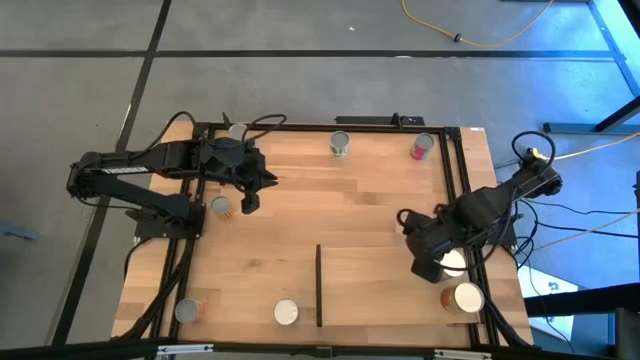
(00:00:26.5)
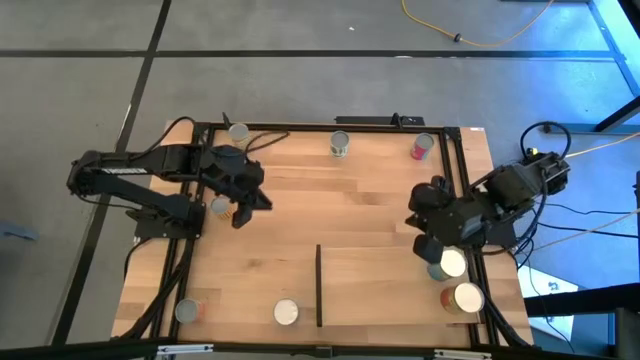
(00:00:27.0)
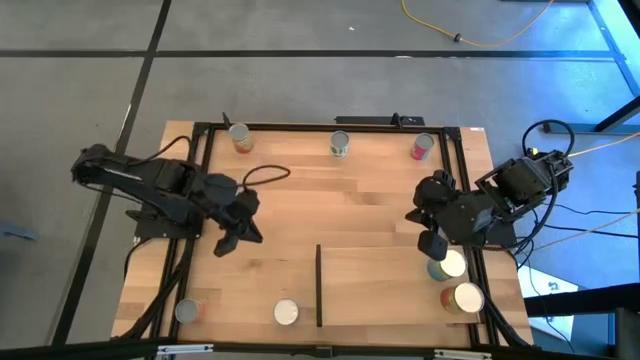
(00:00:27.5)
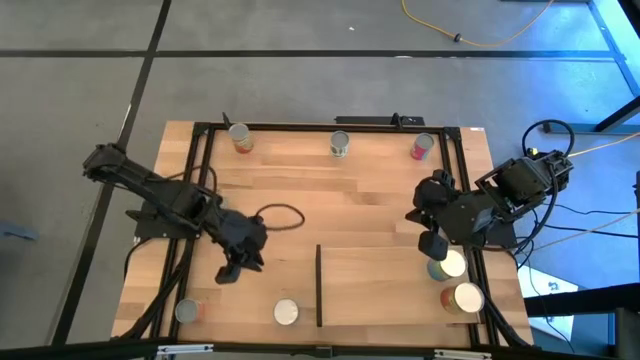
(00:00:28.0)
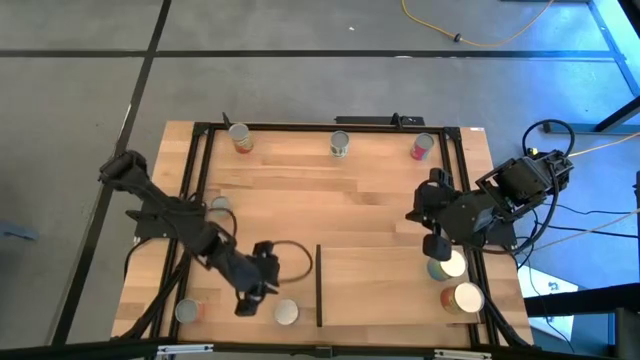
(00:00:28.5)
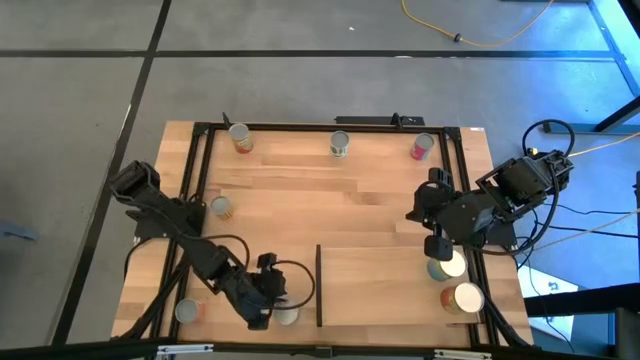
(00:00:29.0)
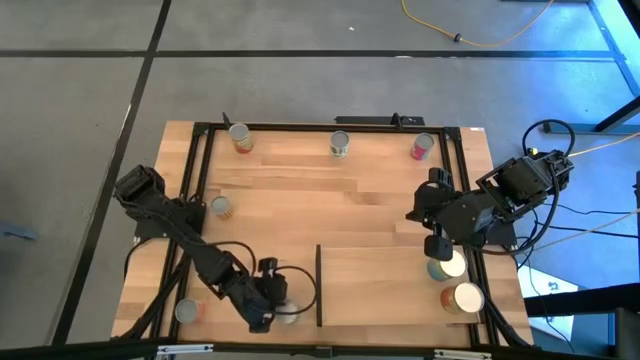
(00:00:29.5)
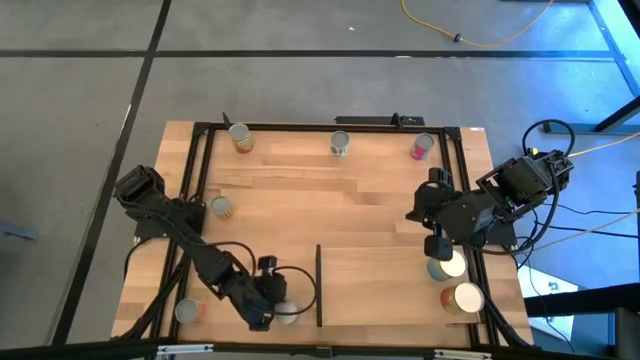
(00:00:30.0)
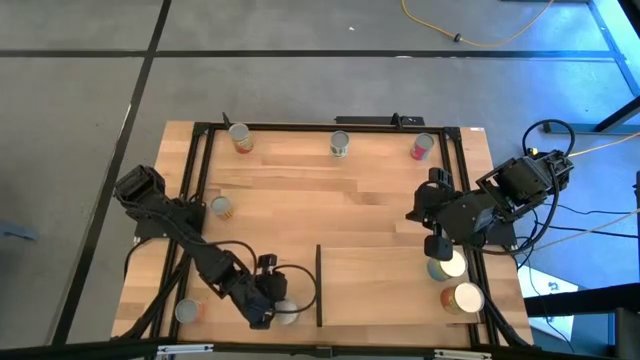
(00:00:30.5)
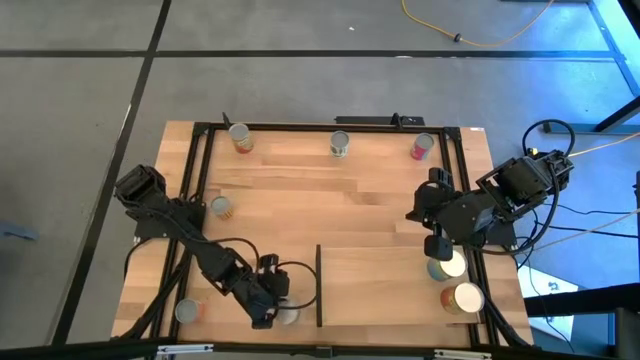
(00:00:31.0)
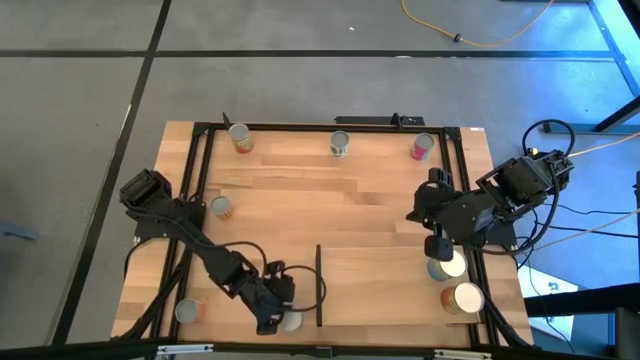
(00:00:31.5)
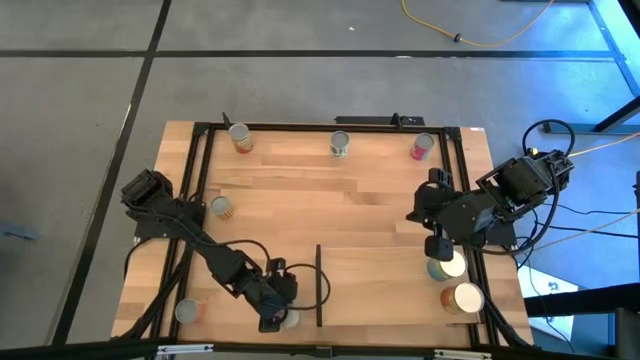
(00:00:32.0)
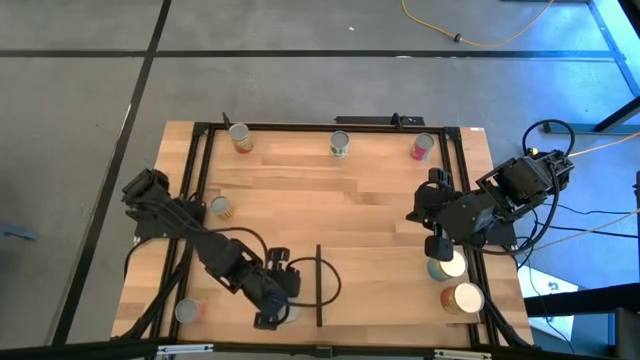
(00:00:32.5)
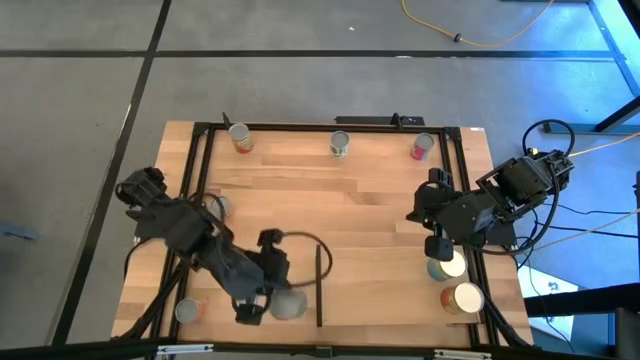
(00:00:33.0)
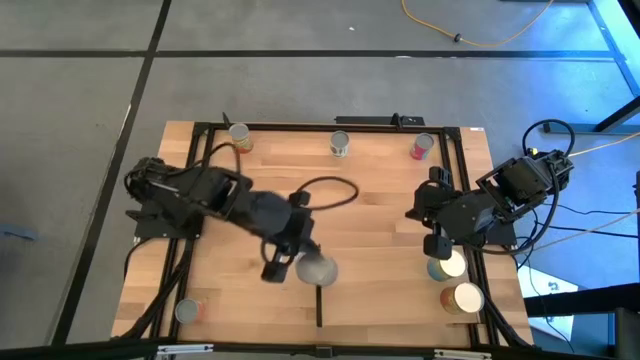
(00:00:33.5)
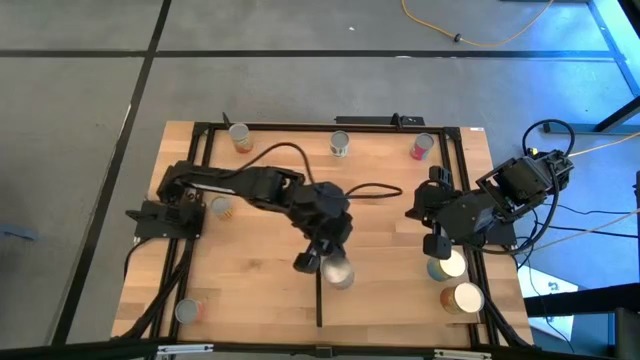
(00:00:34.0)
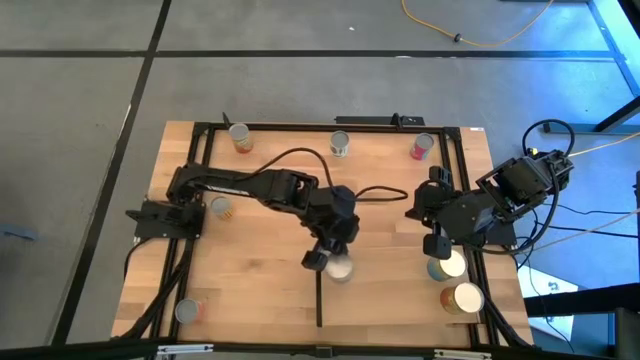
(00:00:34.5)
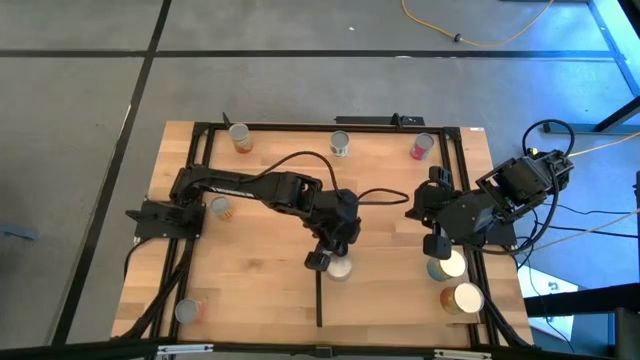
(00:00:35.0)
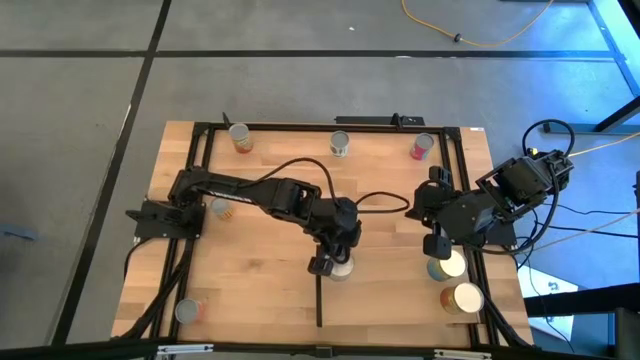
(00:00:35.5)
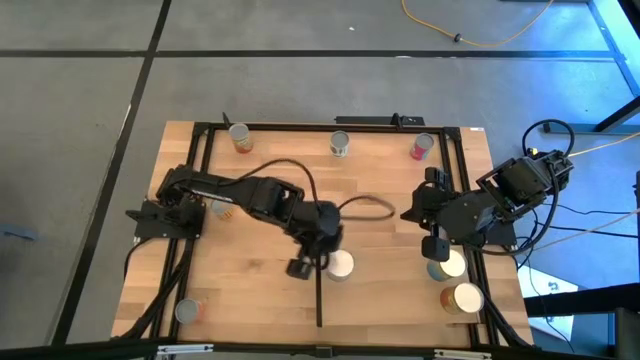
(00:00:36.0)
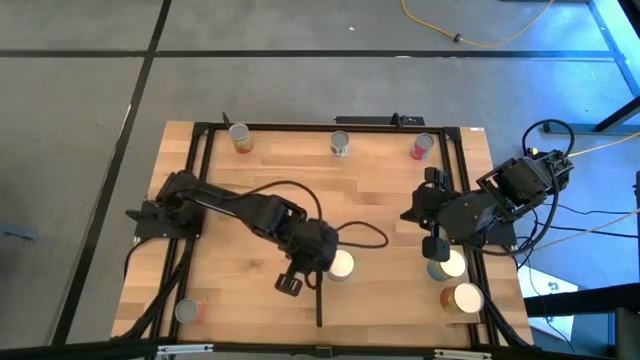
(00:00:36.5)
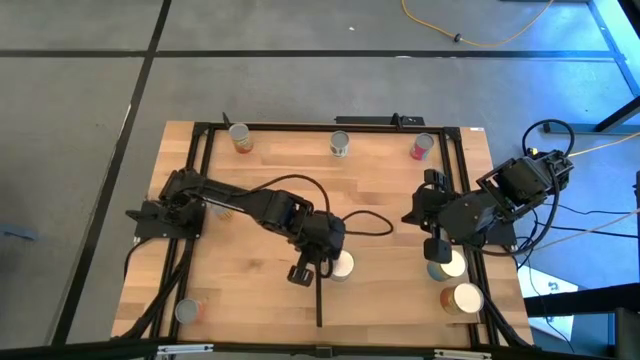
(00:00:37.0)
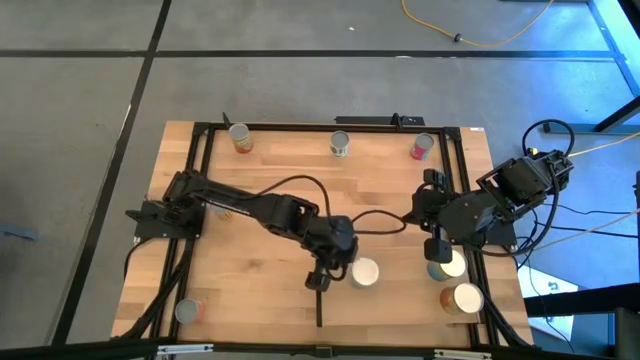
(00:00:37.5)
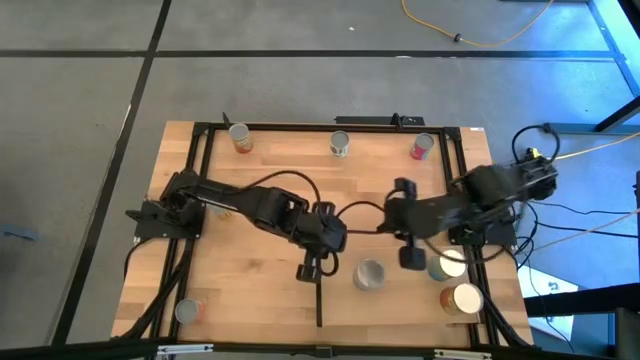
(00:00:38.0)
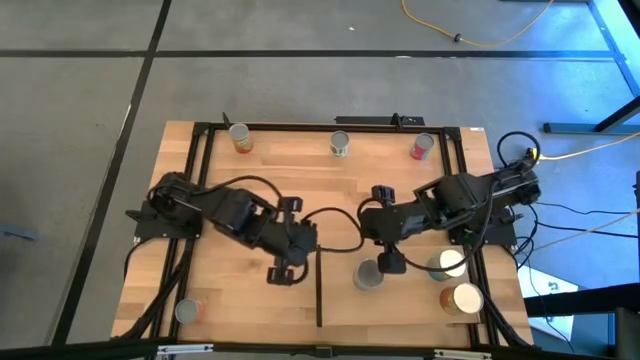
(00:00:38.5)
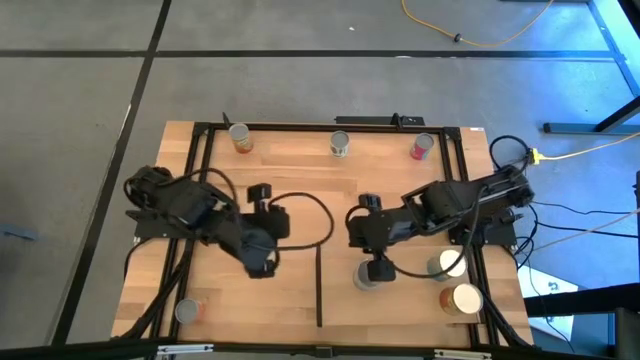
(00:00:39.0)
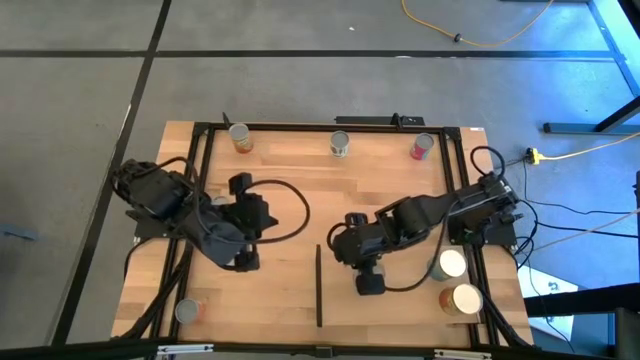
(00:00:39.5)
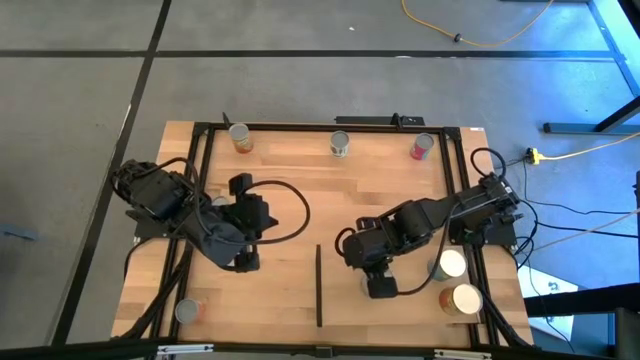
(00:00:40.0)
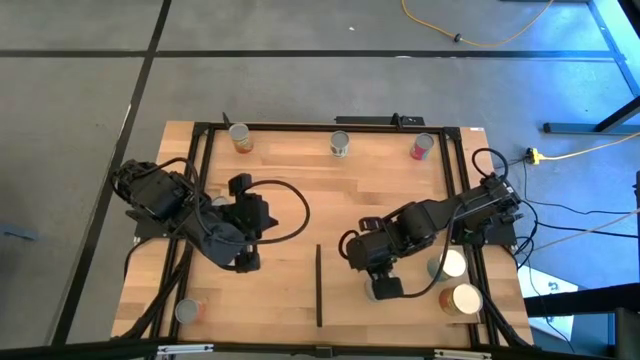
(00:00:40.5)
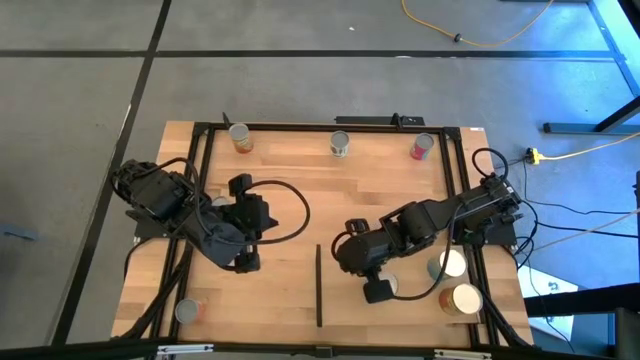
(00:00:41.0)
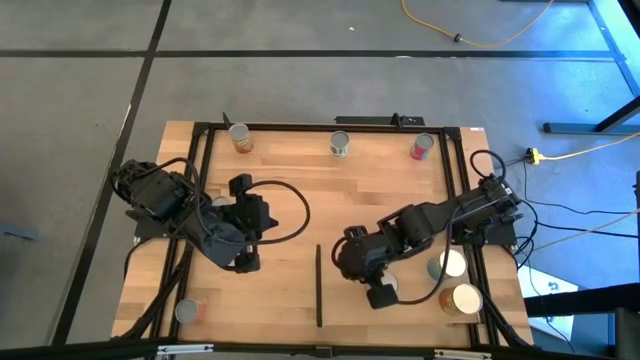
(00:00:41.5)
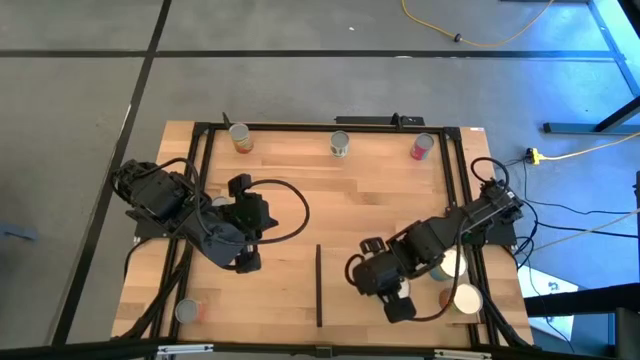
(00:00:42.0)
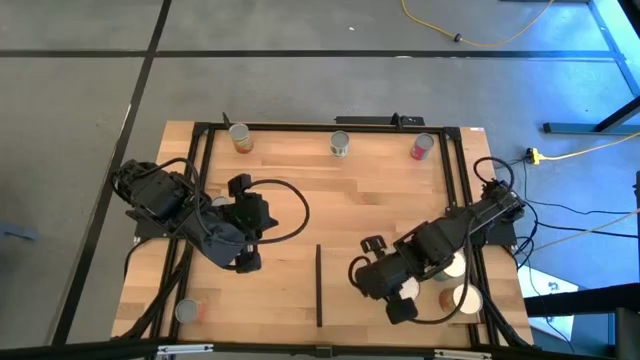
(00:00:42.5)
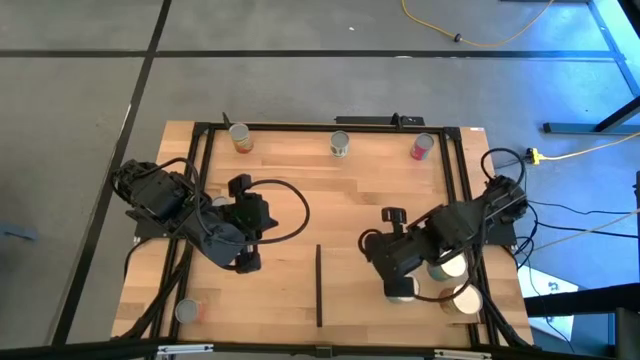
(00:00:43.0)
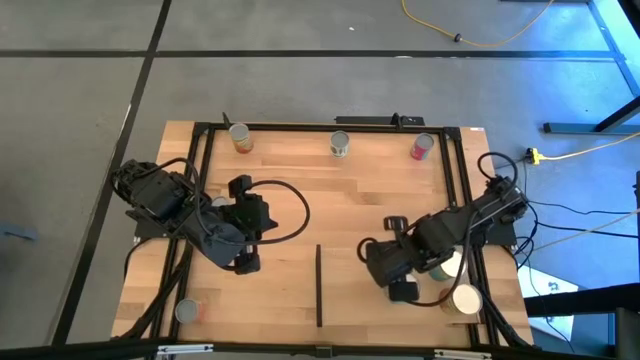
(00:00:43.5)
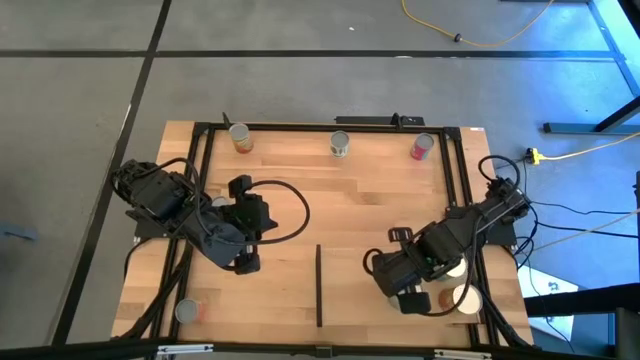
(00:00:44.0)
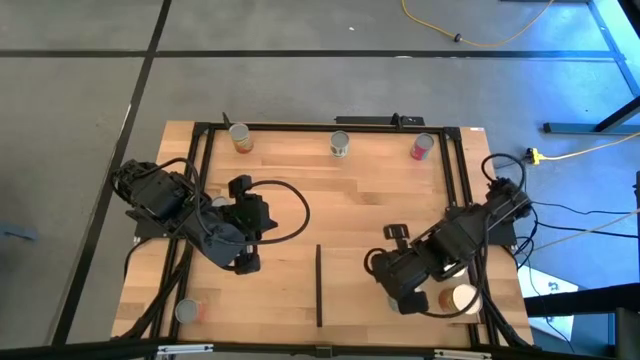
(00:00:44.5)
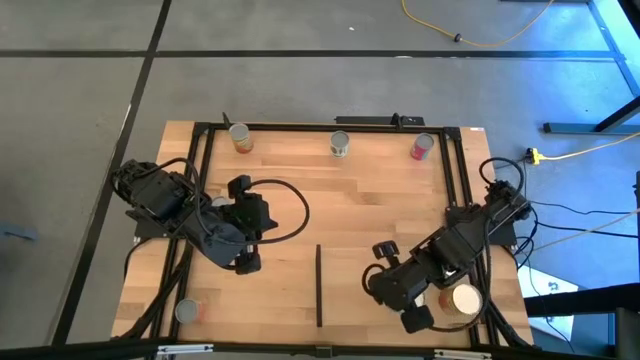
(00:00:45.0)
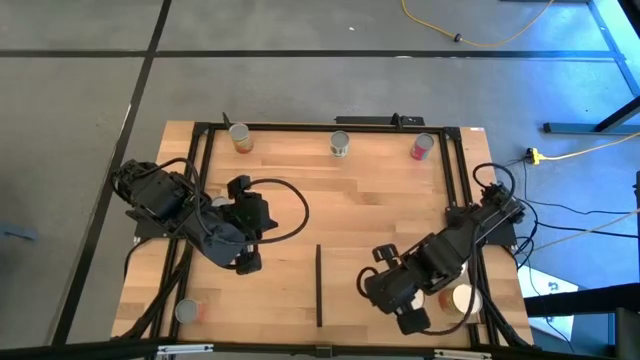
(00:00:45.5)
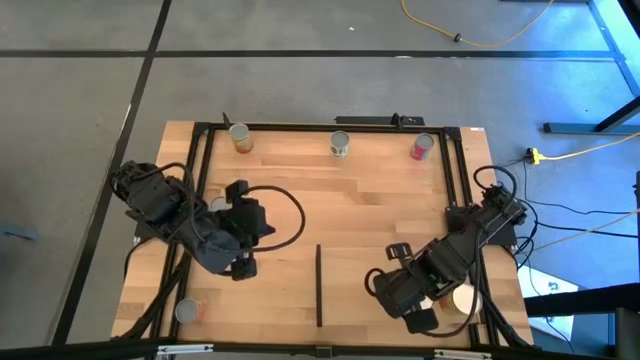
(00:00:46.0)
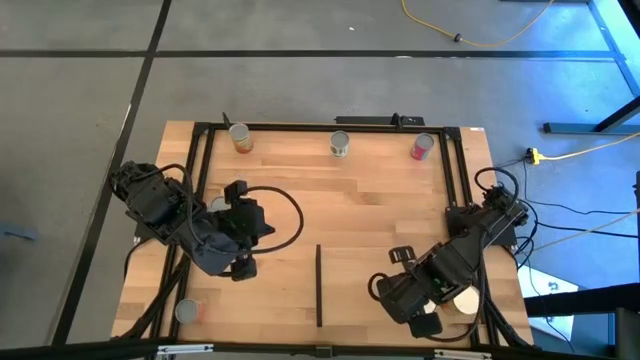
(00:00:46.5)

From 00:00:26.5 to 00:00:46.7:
Task: Pick and place cans onto a shelf
Put the canned cherries on the shelf
